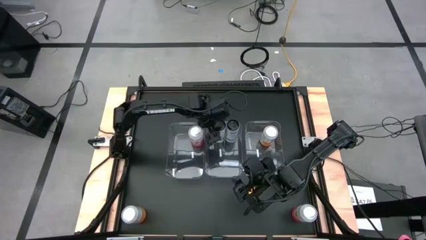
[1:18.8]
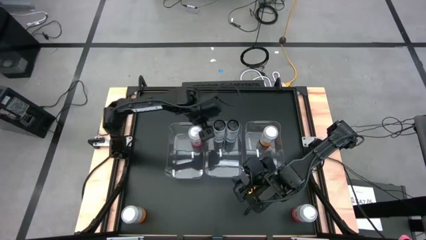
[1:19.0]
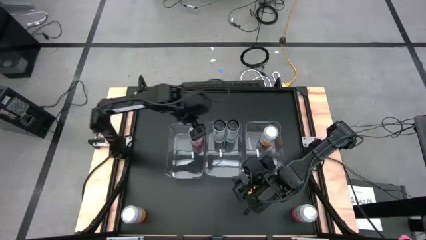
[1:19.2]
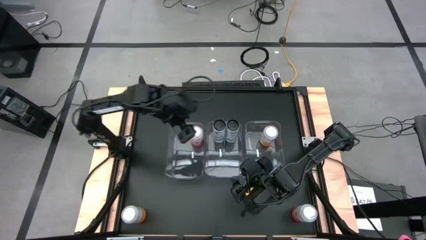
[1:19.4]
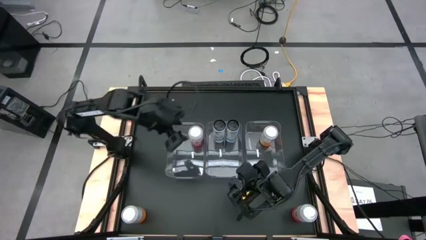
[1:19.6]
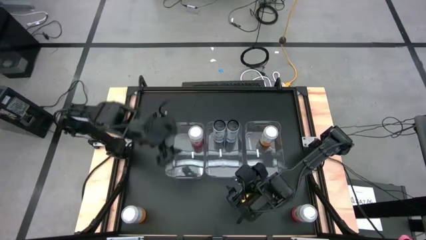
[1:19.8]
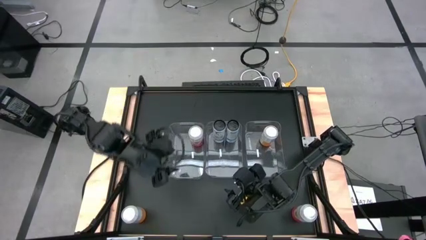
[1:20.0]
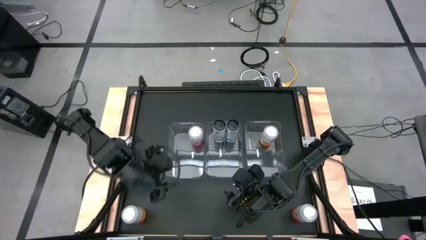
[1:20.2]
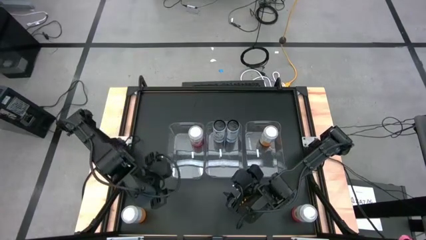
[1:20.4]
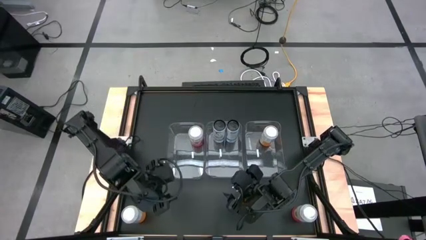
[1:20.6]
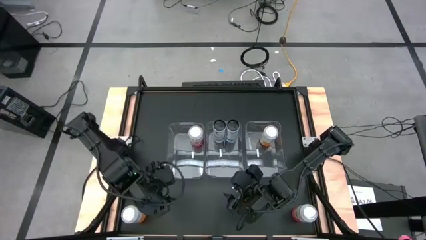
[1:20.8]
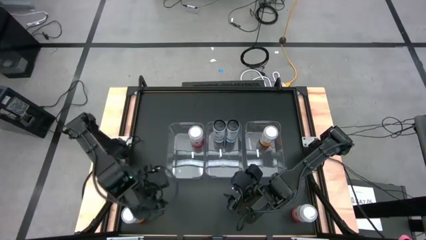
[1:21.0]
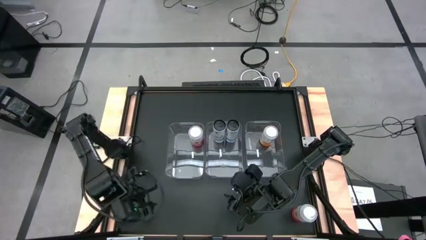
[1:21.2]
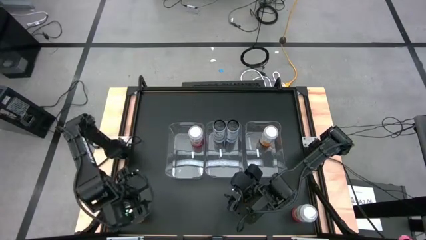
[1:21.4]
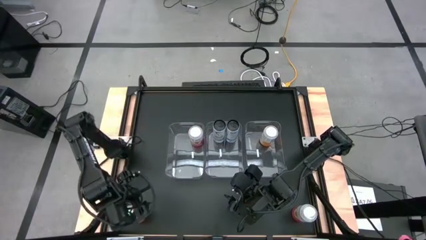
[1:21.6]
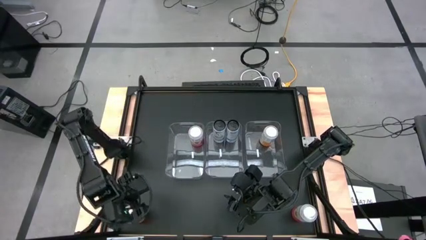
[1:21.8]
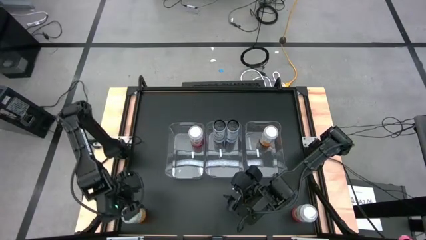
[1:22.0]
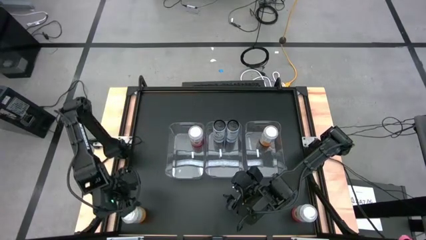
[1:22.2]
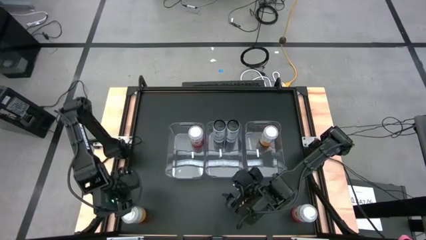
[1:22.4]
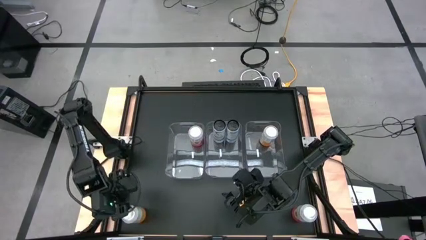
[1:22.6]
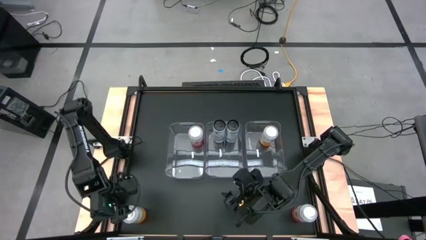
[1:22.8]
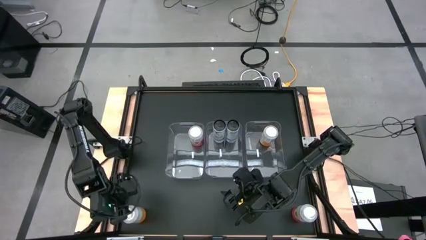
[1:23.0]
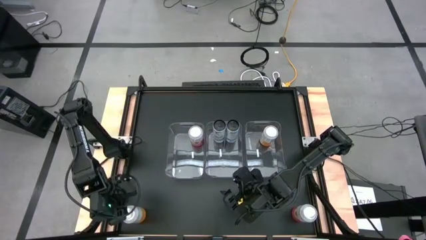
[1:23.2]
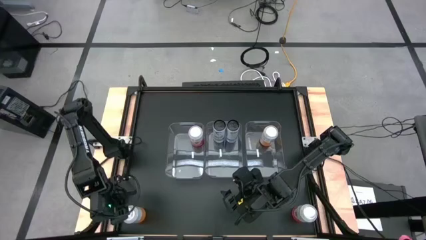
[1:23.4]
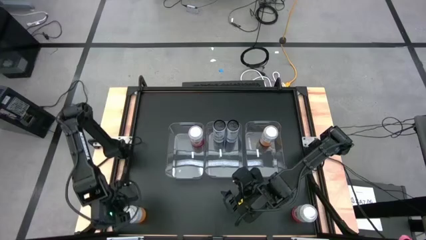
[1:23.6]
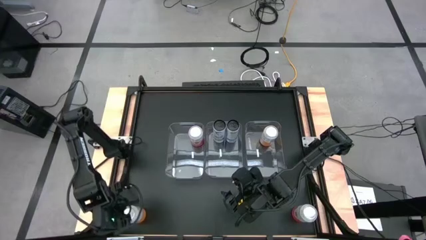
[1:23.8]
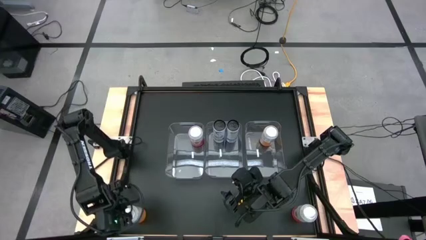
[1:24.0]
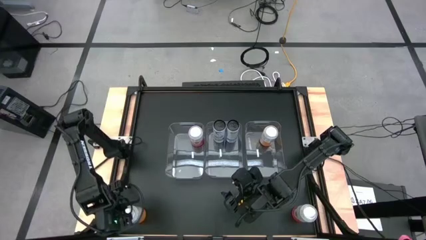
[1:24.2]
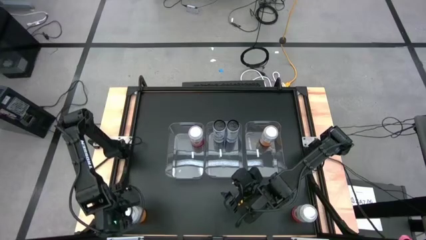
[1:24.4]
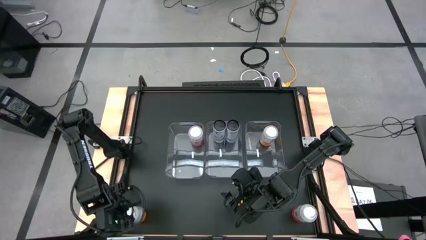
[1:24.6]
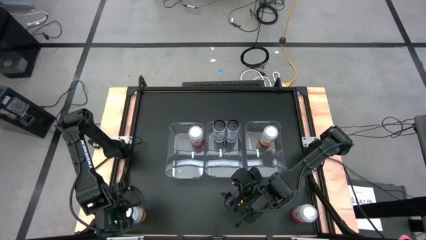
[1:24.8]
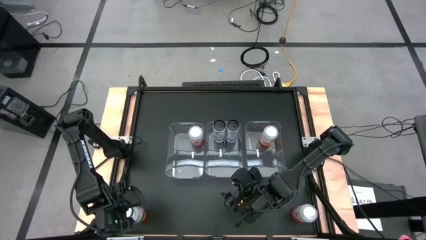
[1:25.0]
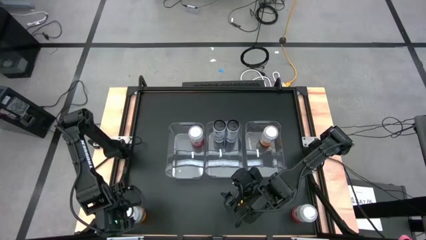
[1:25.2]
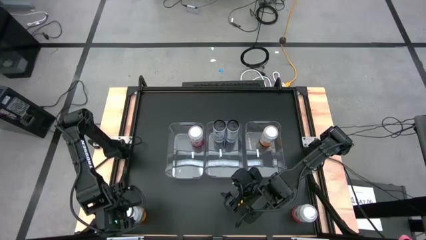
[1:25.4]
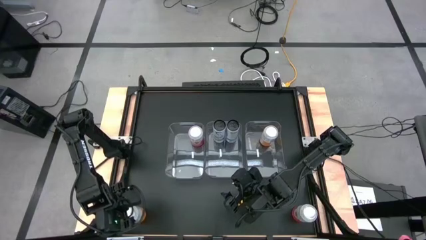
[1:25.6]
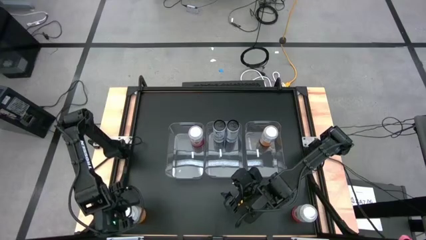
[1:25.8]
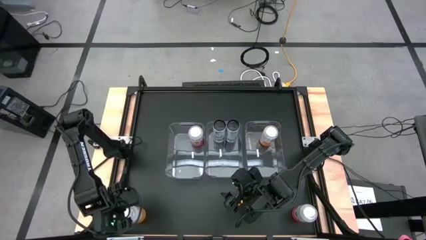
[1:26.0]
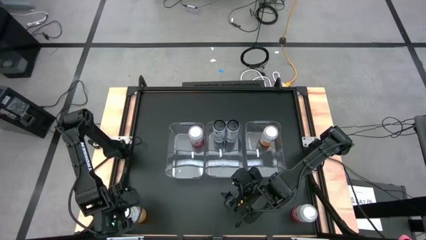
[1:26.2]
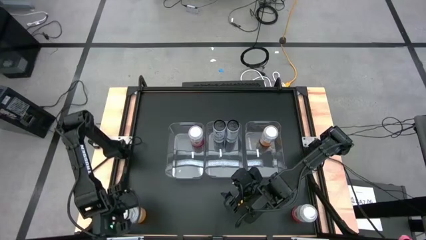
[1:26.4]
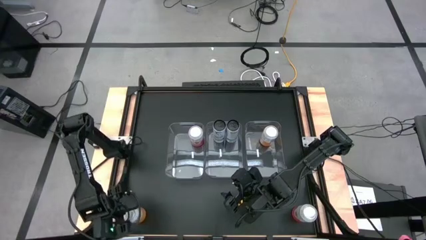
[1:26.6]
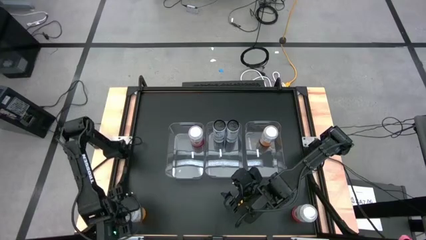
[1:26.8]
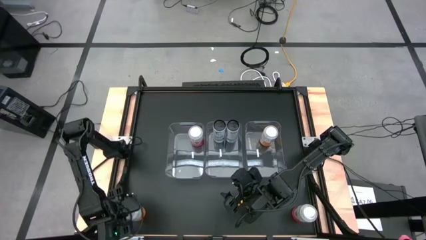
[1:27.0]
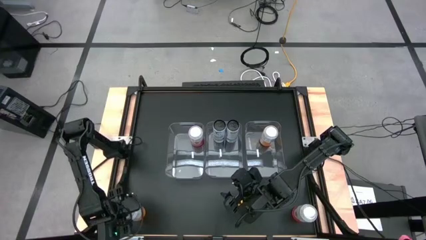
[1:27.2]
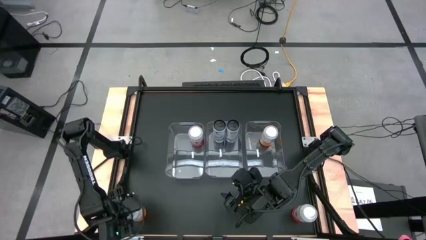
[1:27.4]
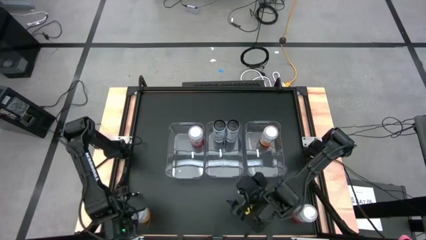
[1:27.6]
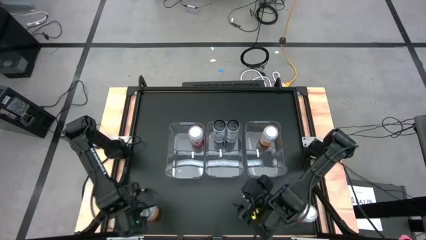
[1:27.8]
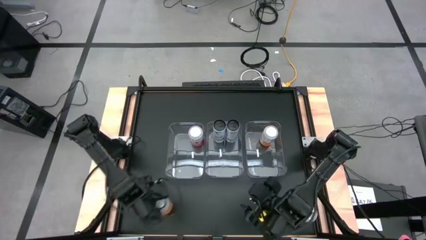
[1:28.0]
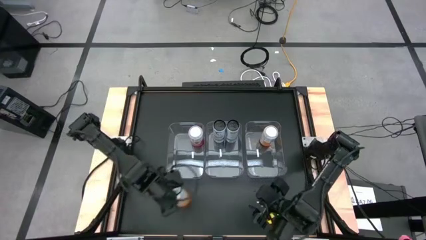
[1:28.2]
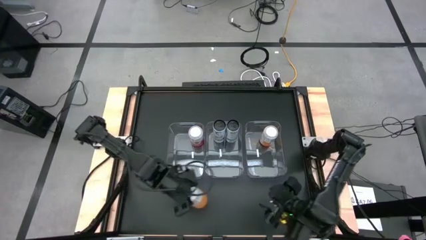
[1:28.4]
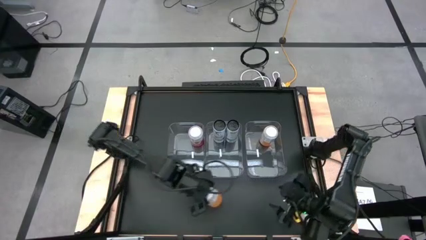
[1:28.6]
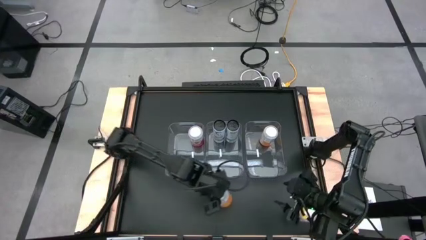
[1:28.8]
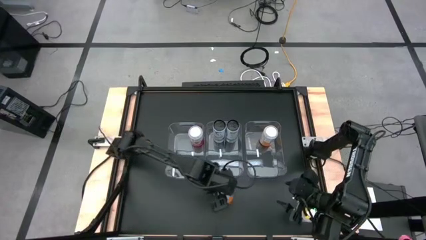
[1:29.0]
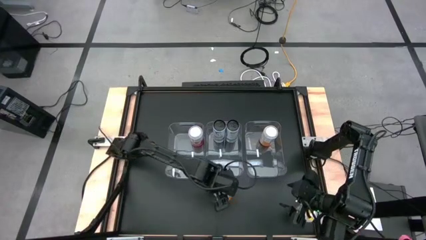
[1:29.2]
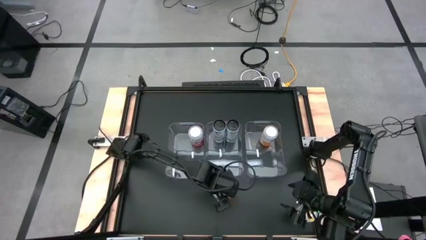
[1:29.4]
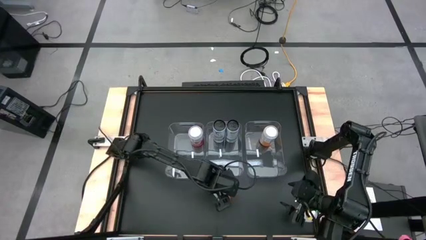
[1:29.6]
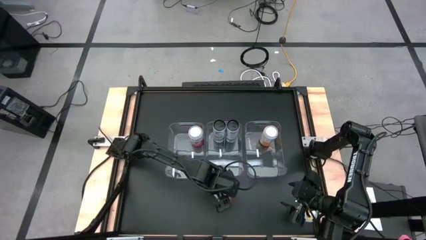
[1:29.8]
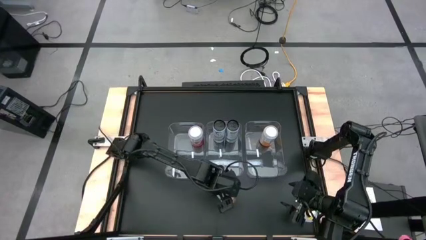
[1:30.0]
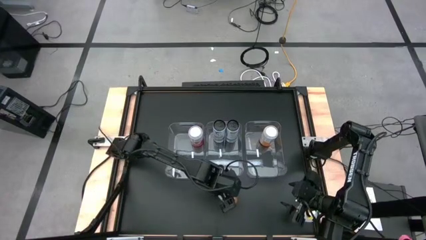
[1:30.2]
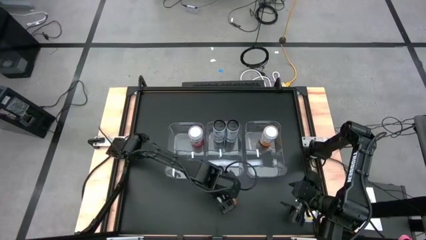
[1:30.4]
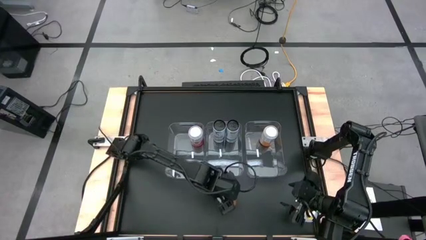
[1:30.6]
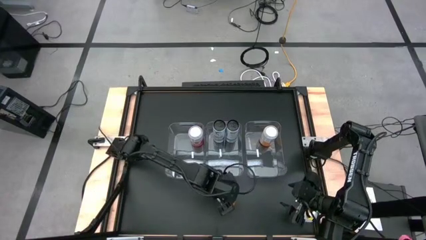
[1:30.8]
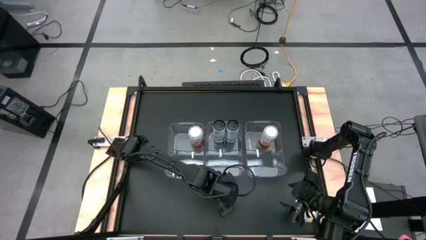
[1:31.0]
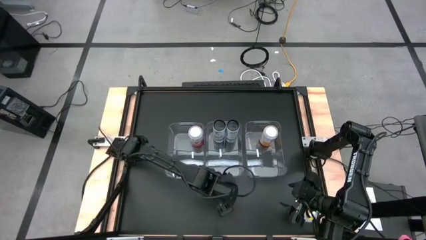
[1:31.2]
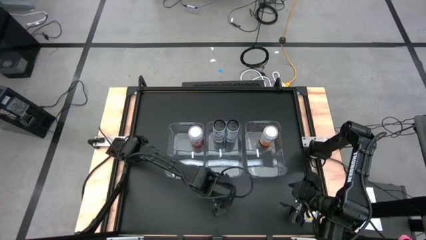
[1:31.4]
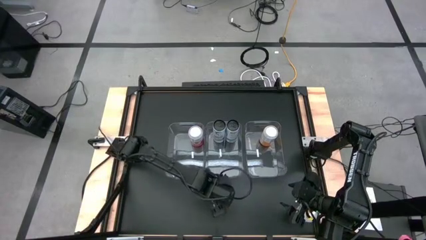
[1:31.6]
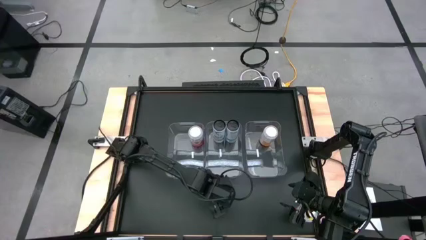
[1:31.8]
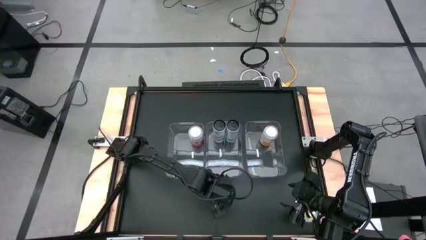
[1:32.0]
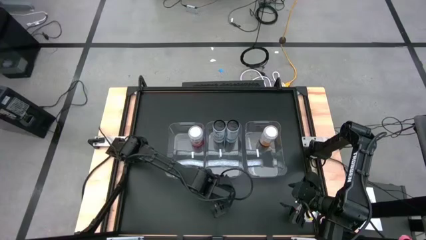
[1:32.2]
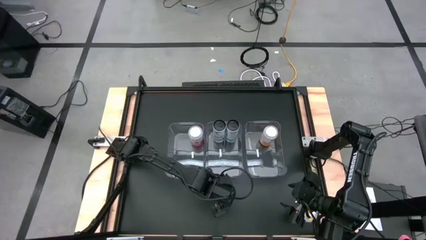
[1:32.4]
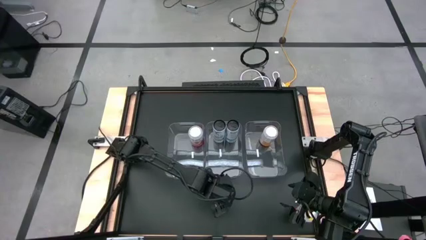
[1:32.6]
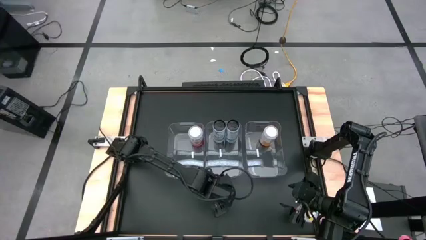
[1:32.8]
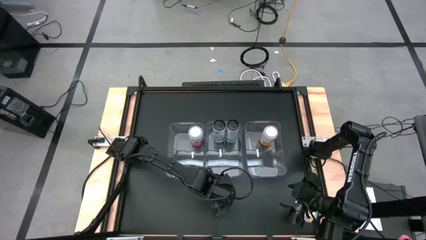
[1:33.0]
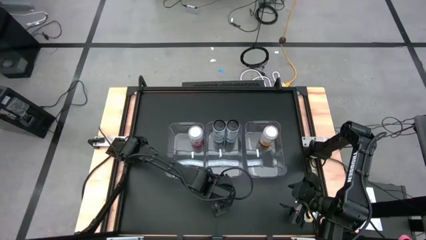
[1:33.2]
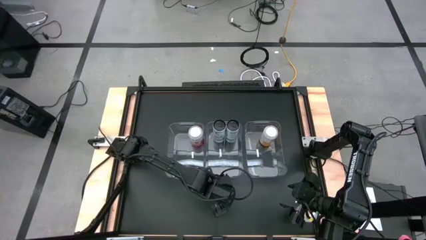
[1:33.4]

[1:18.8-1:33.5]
Task: Sort soda cans
Put the yellow-white soda can into the right transparent bin

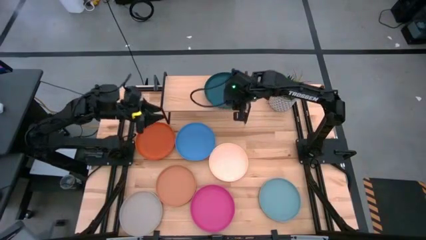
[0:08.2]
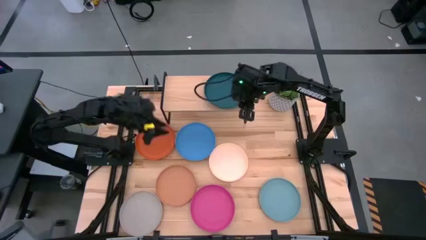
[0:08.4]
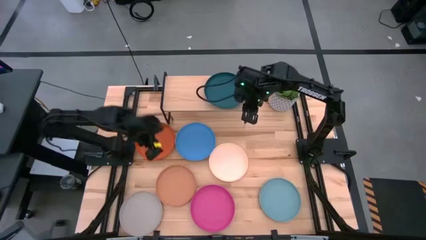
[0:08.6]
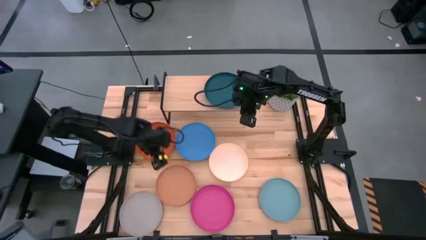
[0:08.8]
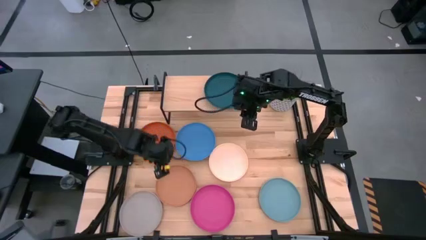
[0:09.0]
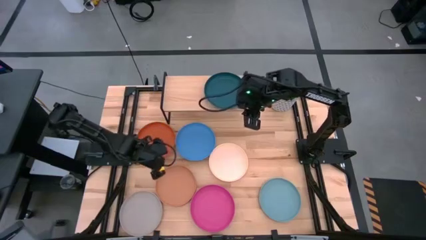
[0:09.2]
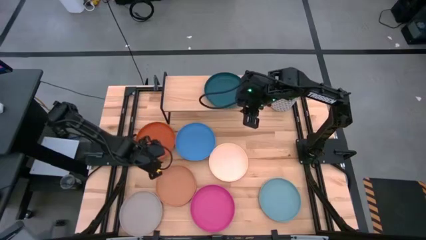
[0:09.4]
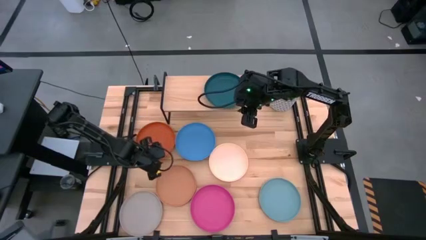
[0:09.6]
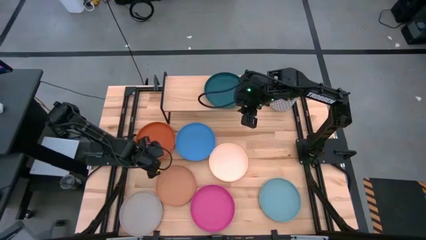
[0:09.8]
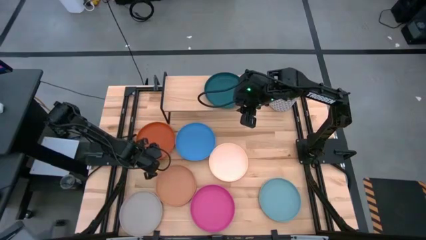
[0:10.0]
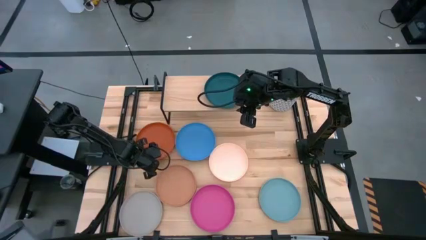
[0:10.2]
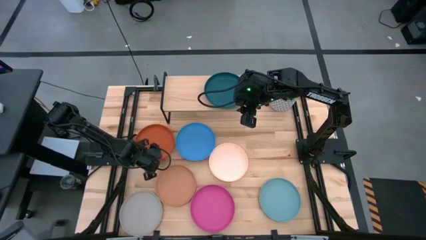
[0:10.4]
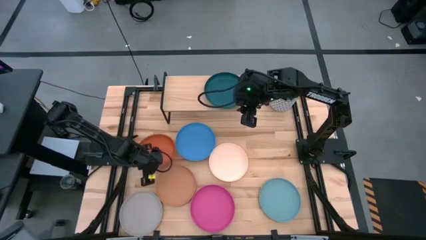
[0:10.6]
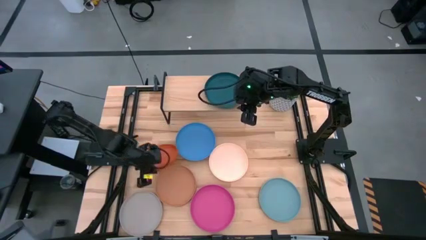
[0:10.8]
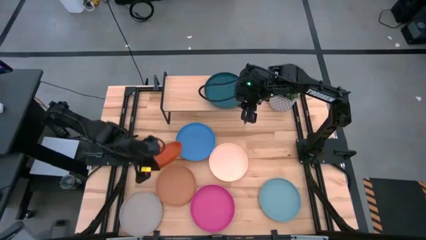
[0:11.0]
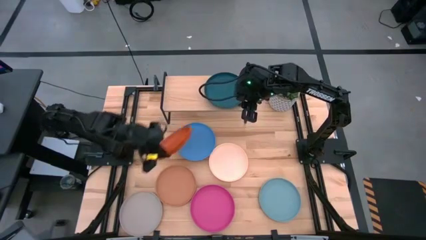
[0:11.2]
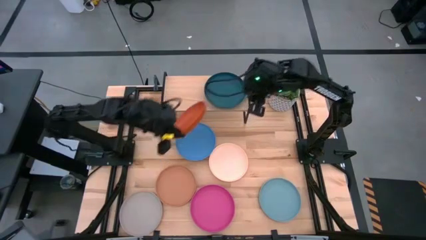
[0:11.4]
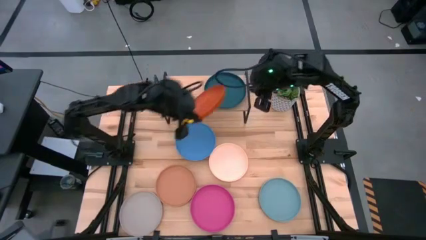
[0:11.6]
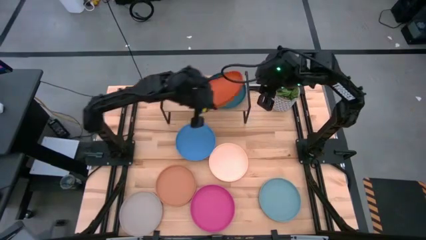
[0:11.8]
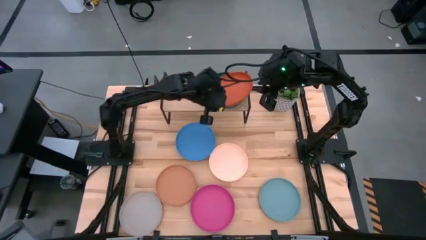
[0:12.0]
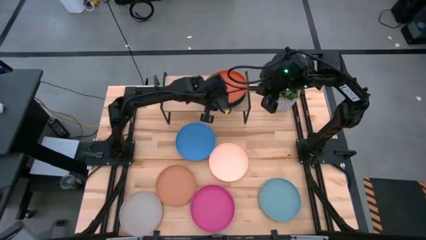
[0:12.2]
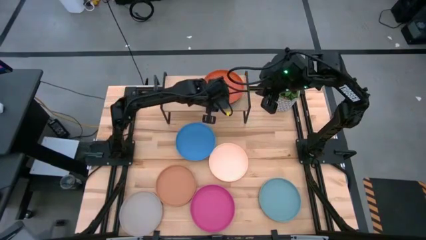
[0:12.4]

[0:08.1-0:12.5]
Task: Place and stack plates onto a shelf
Stack the orange plate on top of the dark green plate on the shelf
